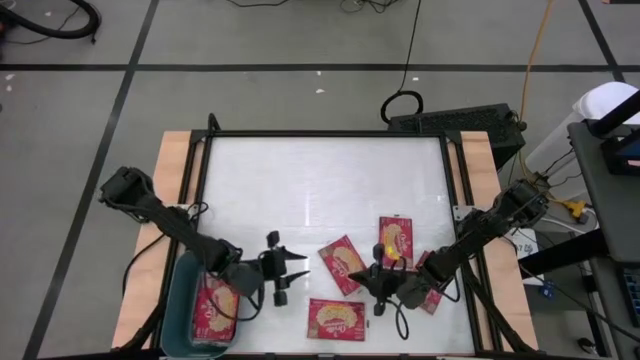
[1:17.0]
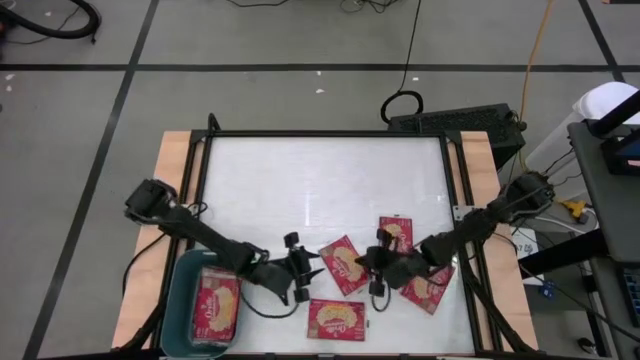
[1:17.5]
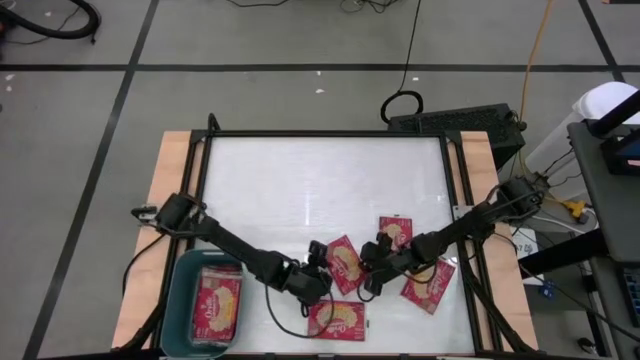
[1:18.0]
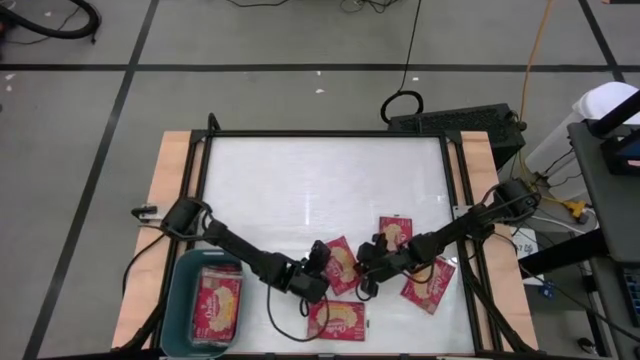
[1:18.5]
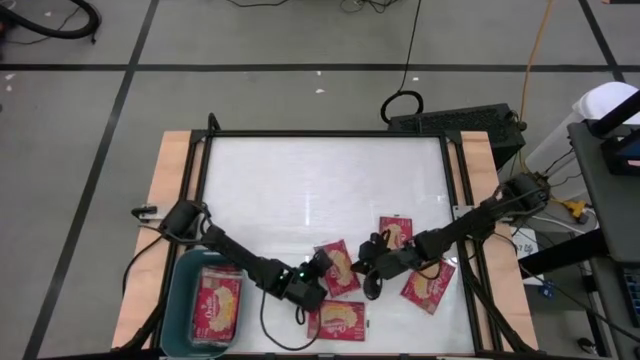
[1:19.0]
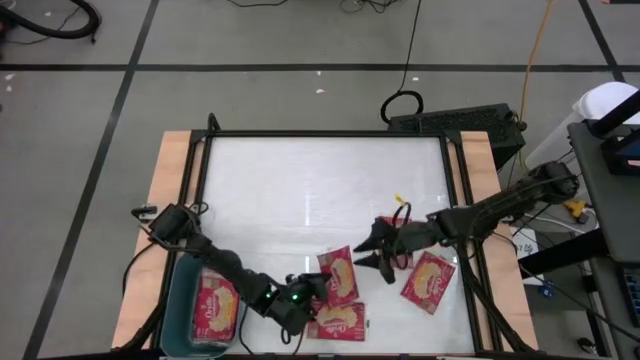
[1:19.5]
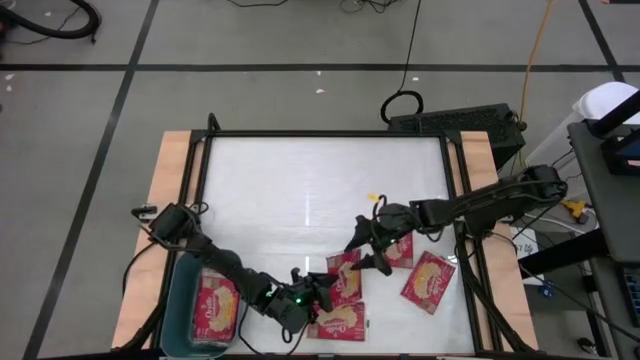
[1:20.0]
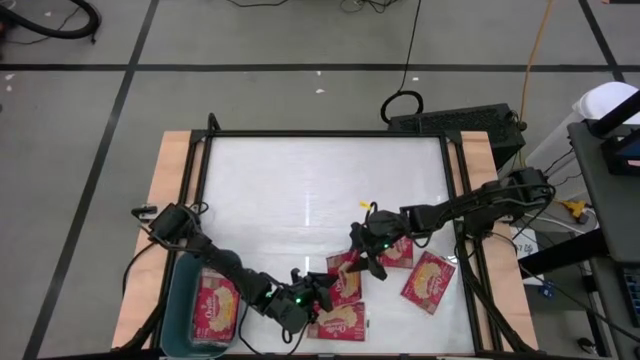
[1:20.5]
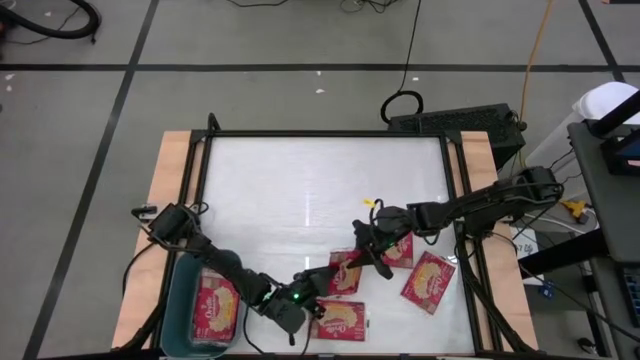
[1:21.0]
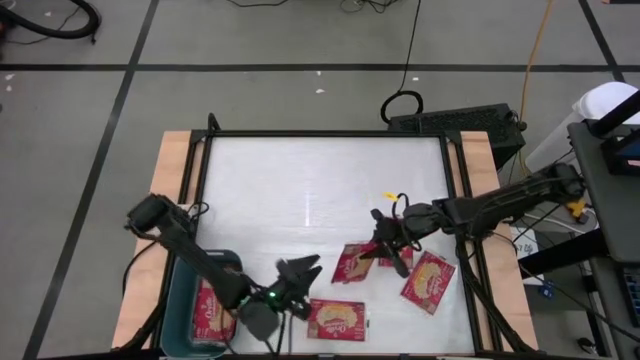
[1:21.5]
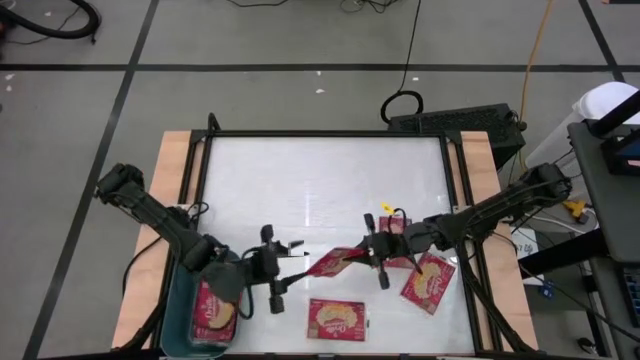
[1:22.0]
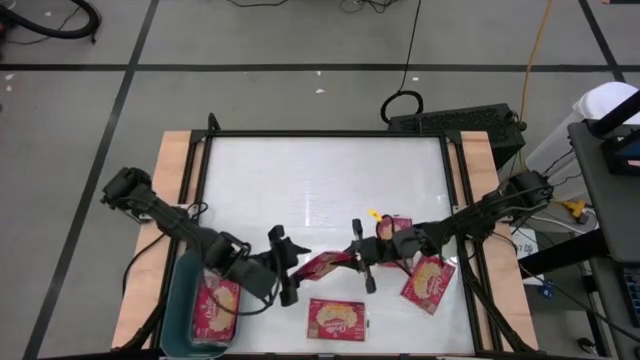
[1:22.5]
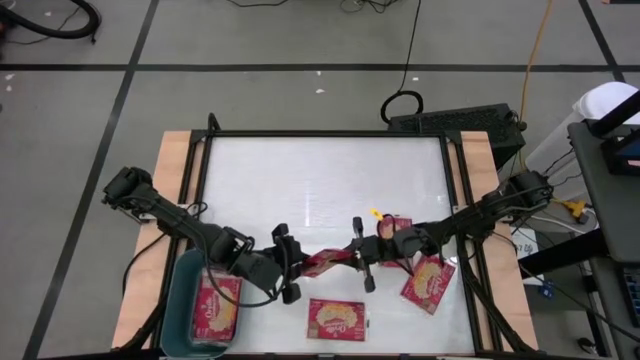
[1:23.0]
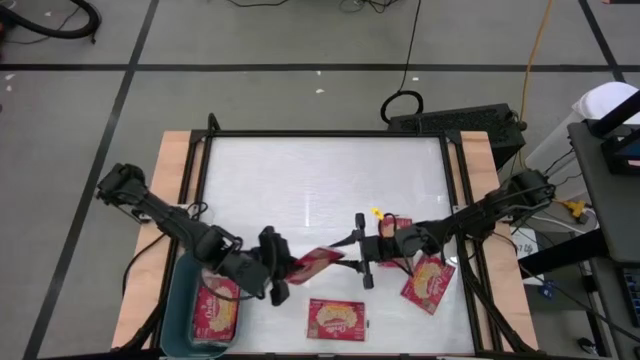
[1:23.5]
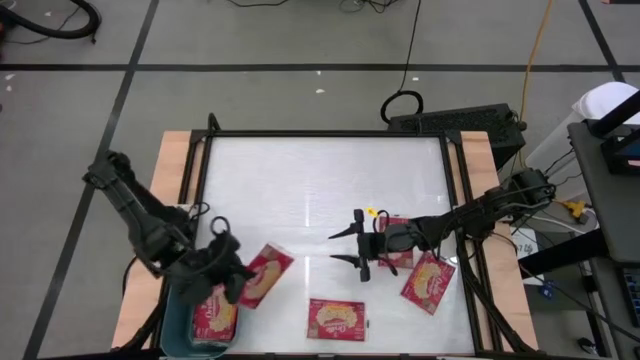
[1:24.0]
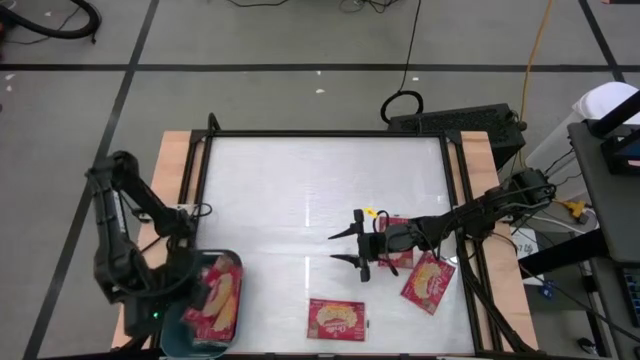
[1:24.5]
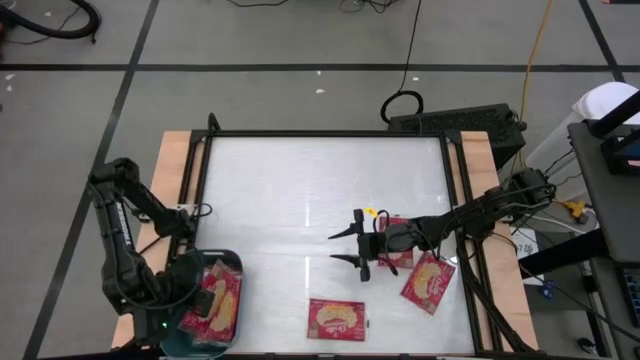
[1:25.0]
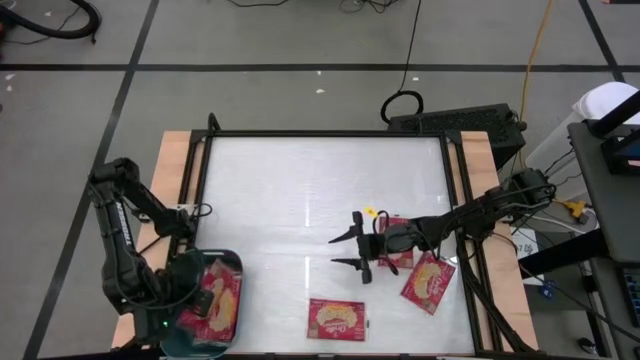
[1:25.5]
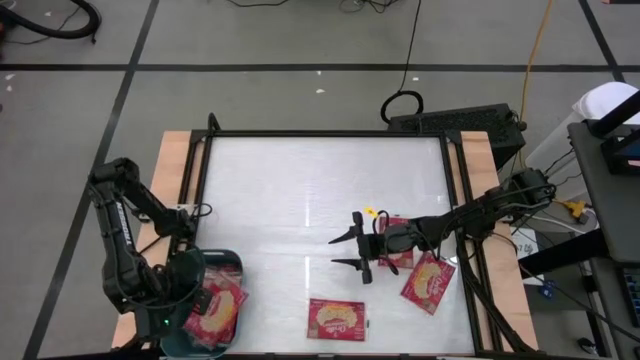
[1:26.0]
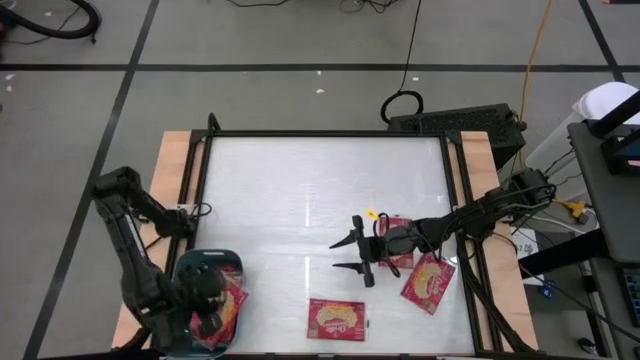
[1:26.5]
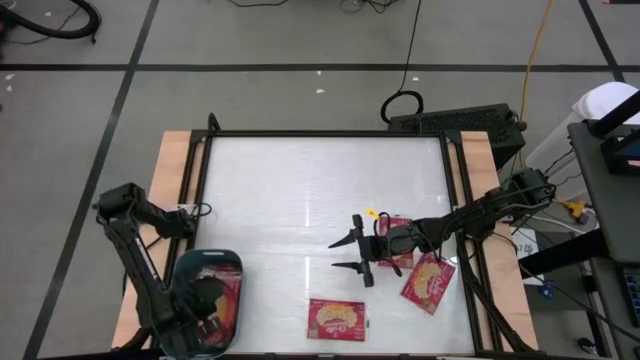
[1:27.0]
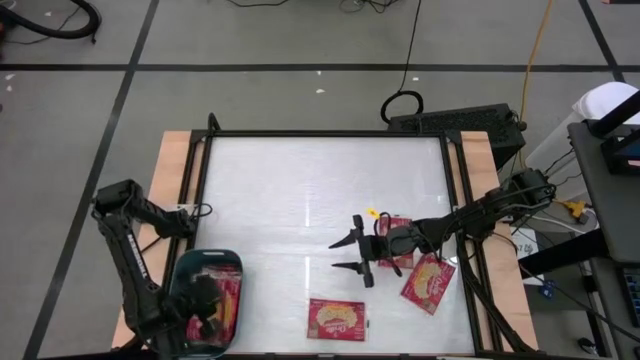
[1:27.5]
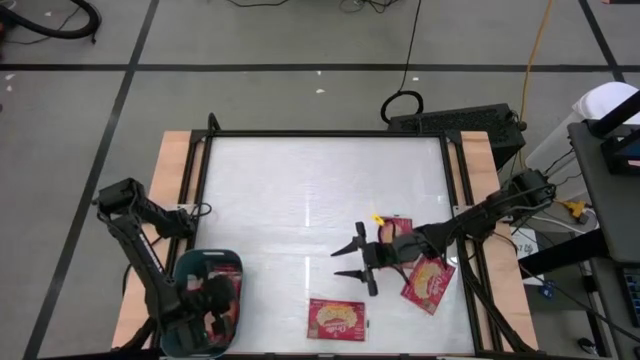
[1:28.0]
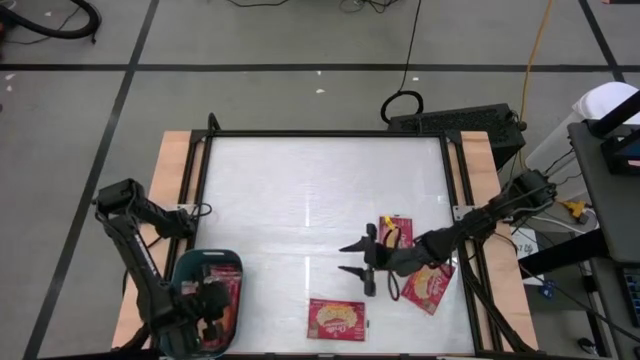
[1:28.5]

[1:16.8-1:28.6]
Task: Sort popcorn bags into baskets
Put the red popcorn bag into the blue bin

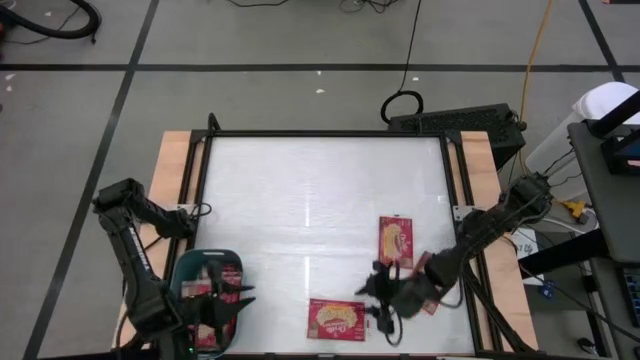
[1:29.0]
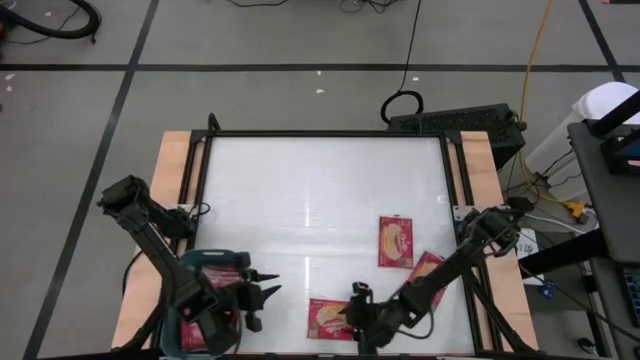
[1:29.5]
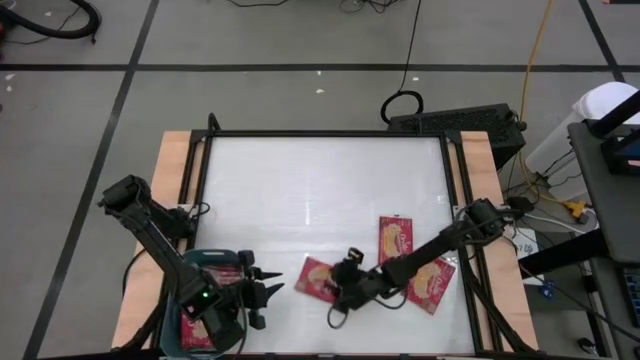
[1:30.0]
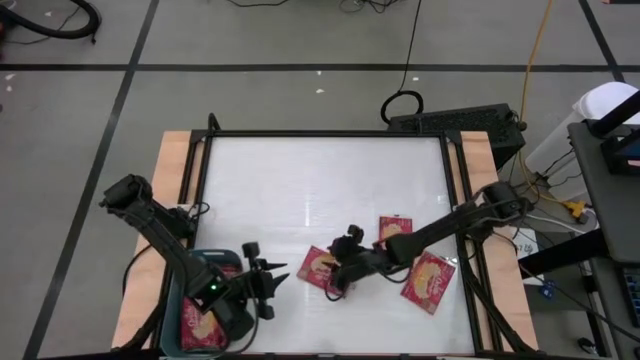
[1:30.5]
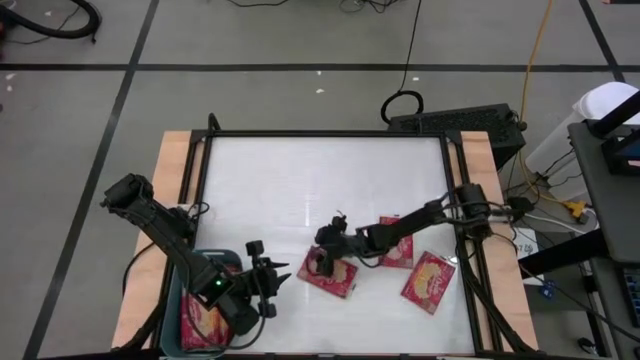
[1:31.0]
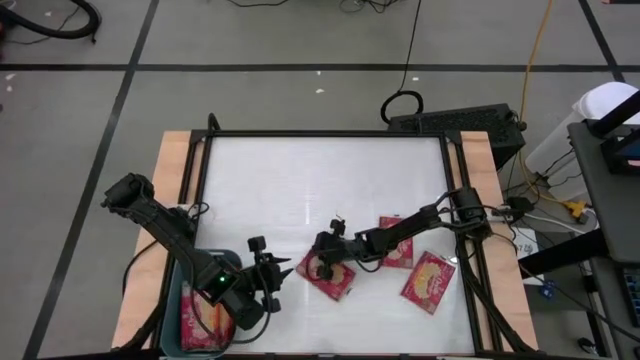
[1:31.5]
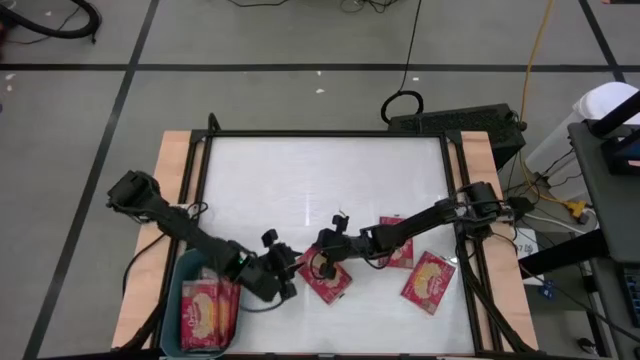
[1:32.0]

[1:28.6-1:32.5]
Put the red popcorn bag into the blue bin

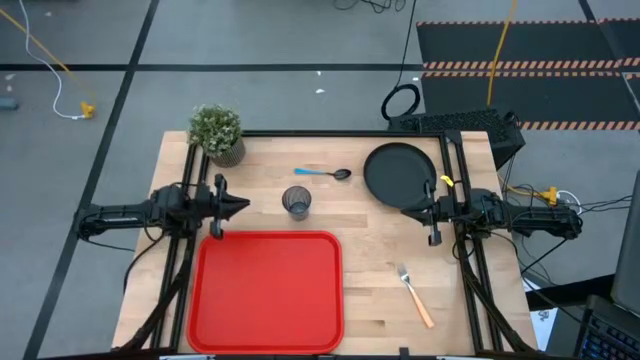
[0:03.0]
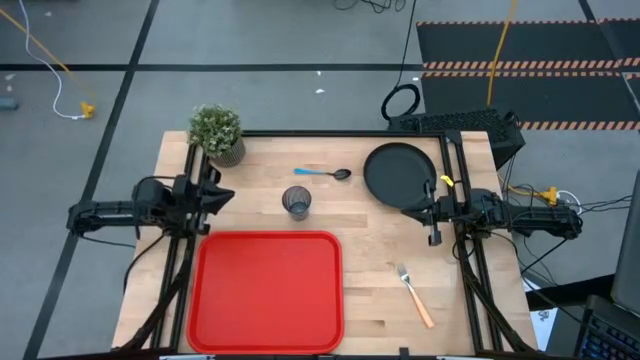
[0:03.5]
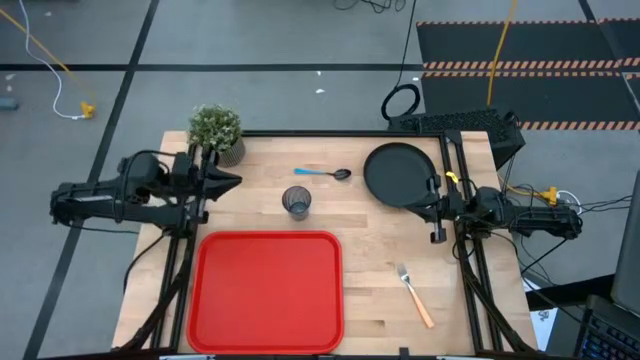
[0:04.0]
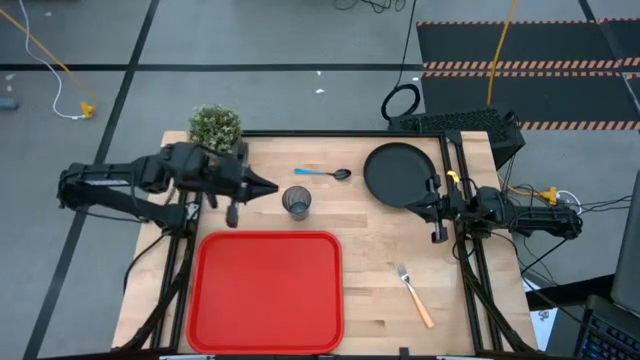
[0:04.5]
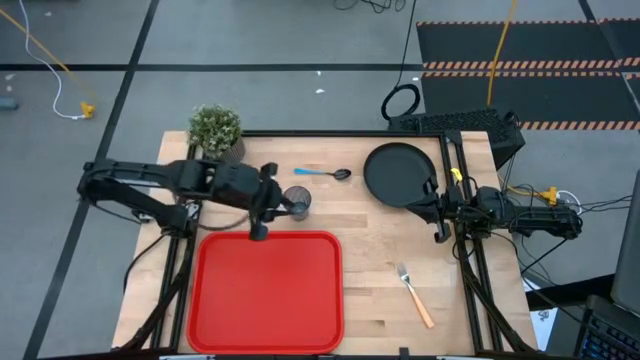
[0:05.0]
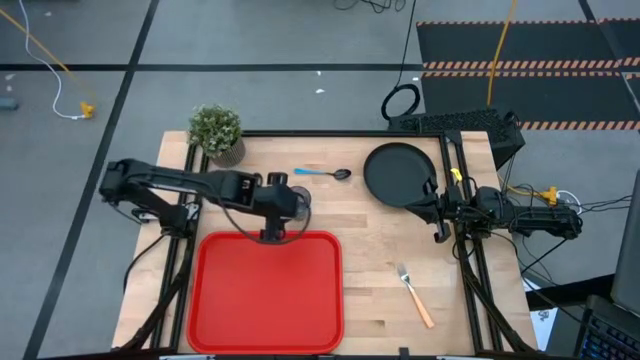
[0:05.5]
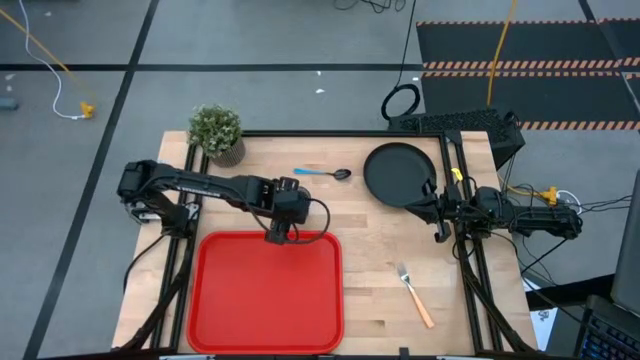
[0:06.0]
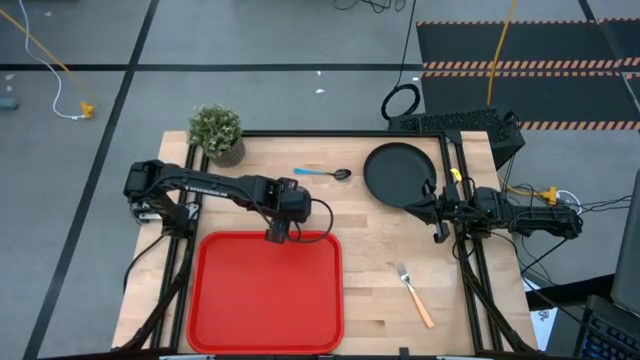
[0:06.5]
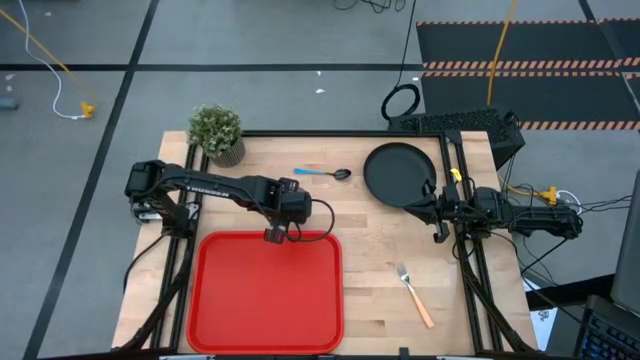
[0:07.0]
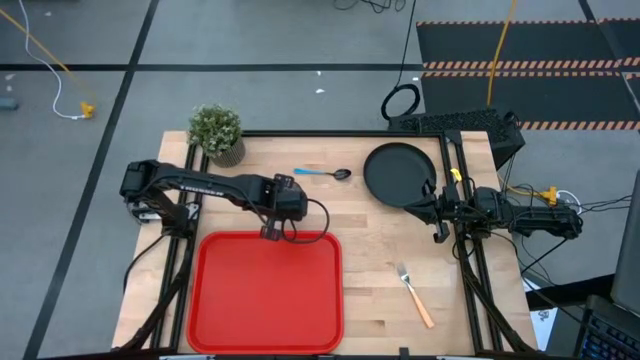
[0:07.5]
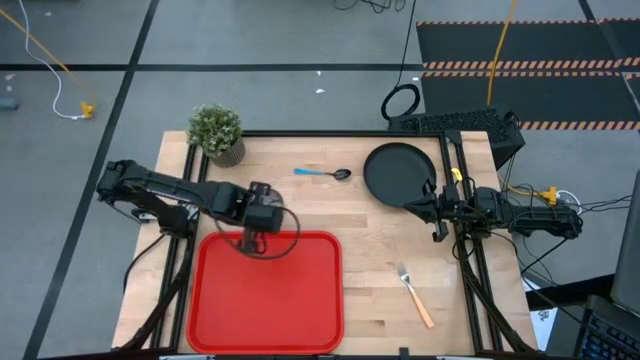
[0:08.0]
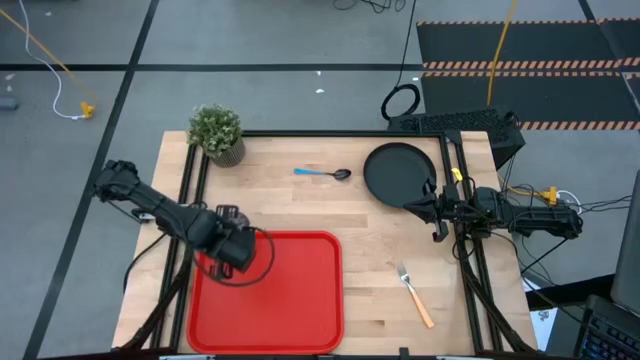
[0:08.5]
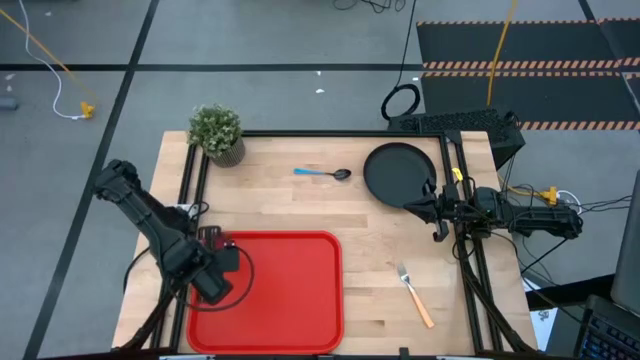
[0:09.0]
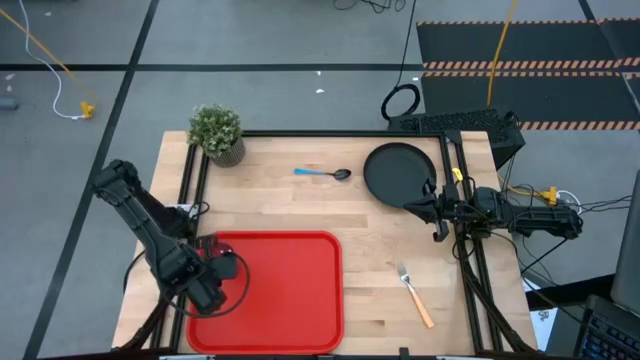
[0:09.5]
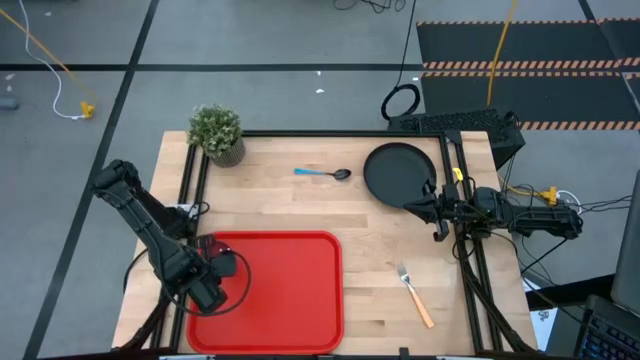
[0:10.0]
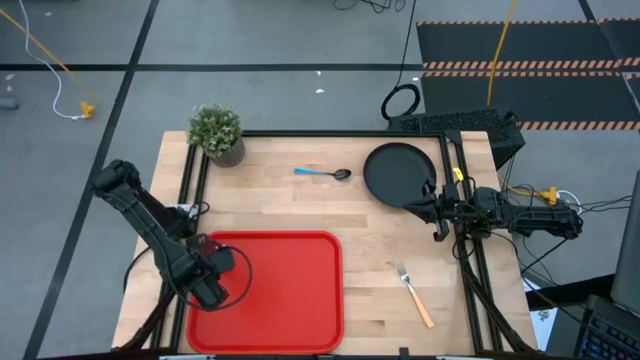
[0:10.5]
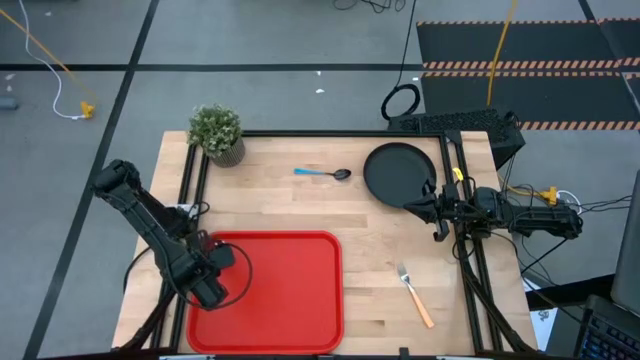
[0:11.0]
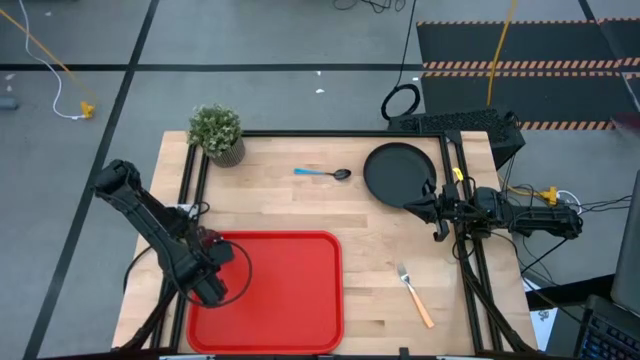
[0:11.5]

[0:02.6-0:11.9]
Task: Pick and place plate/cup/fork/spoon on tray
Put the blue glass on the top left side of the red serving tray
